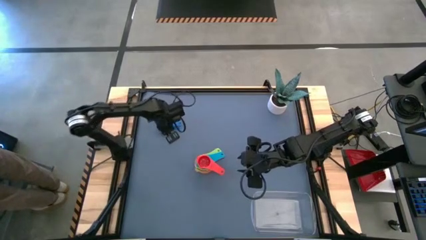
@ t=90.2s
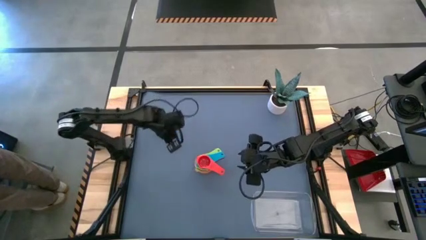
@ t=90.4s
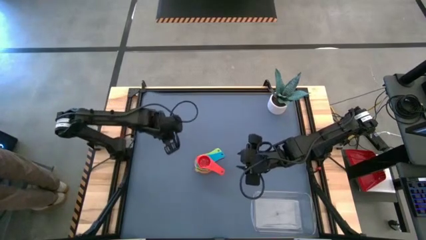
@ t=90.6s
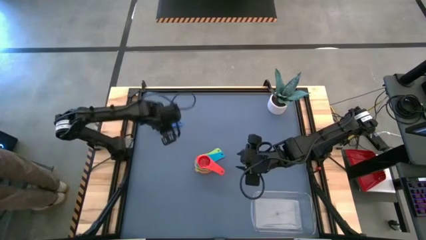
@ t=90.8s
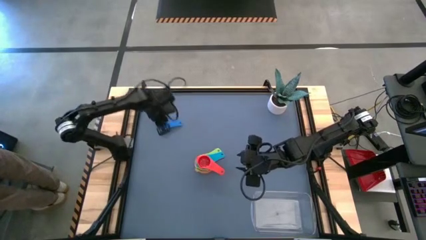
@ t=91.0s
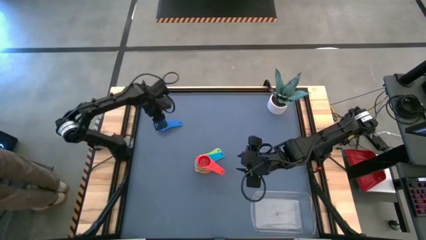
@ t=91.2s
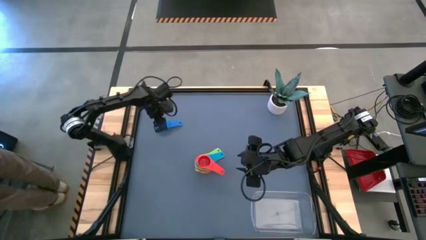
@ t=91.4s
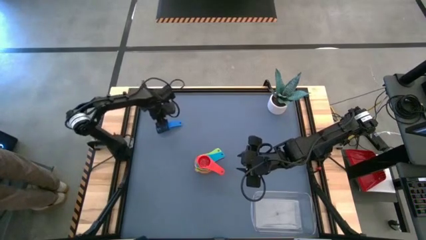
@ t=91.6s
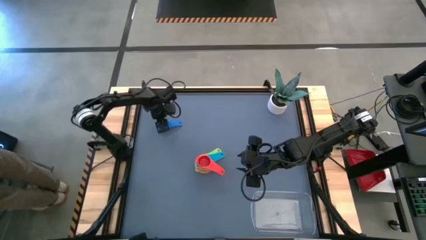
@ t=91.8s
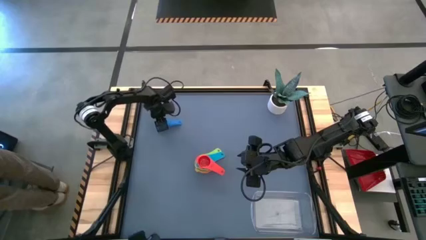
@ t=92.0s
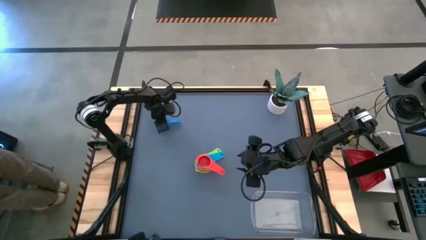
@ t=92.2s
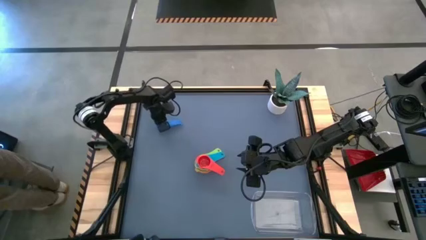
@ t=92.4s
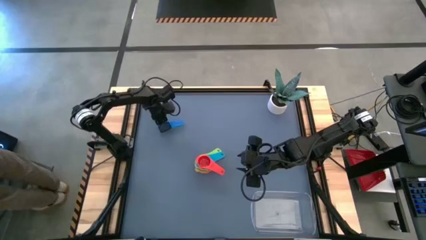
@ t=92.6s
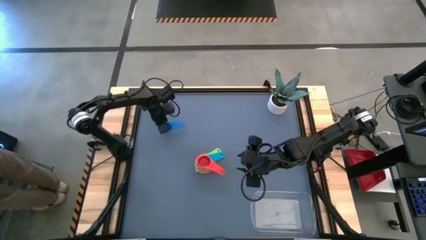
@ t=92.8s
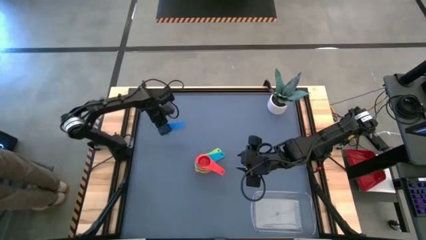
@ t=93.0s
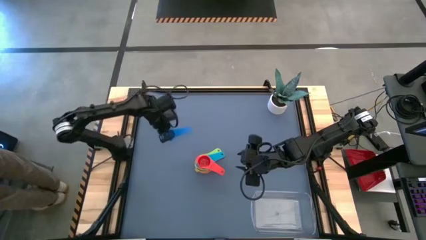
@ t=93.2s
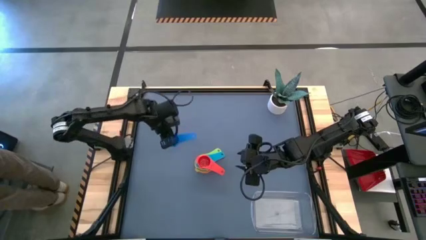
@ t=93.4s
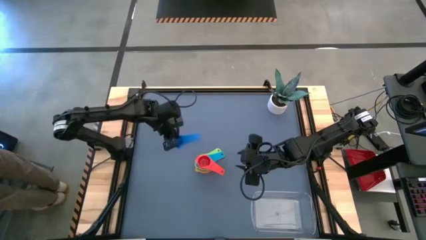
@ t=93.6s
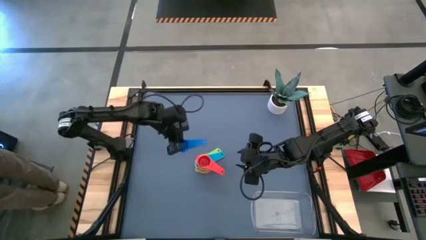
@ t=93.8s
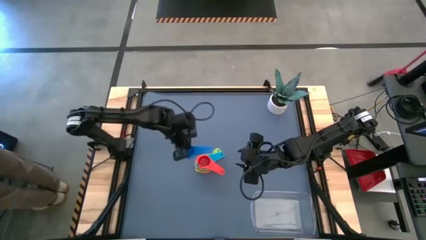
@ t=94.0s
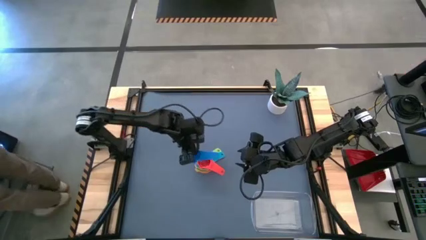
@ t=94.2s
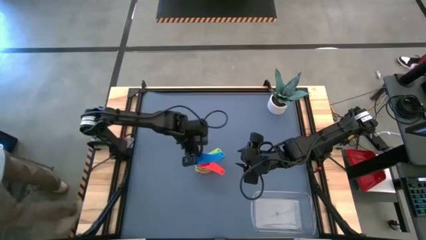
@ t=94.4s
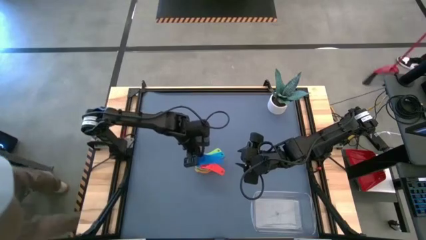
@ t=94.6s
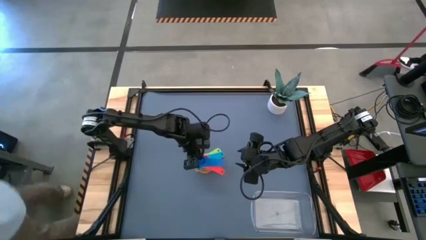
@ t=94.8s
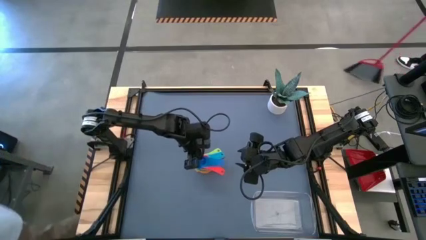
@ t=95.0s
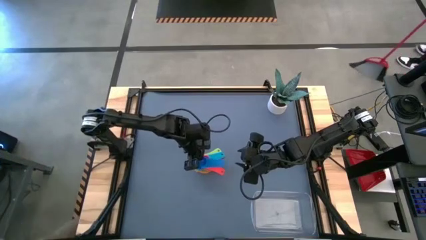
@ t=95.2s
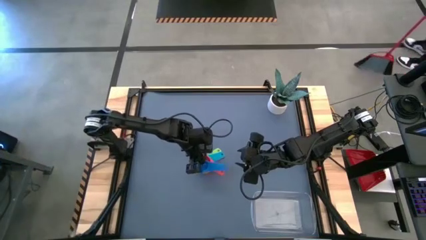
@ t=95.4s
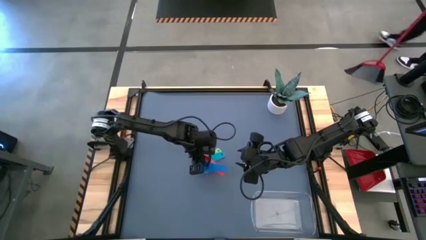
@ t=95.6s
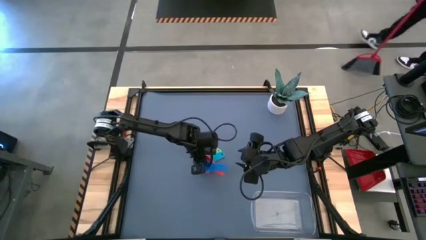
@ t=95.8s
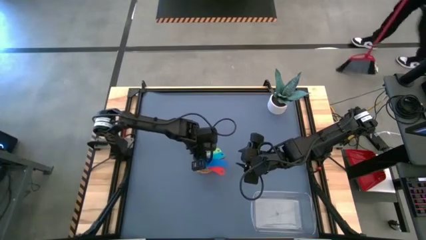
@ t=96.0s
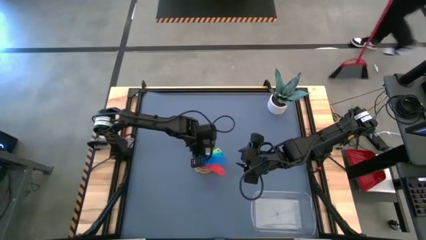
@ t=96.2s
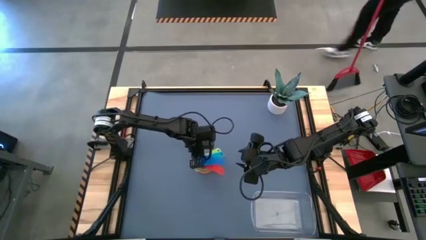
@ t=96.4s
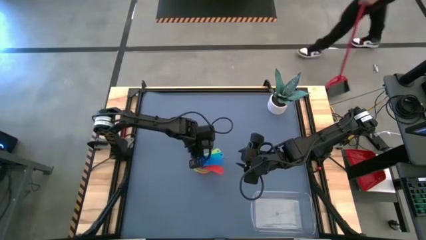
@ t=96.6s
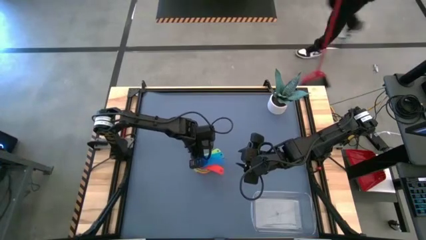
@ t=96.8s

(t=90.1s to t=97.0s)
Task: Nest measuring cups in basket
Stack the blue measuring cup on top of the red measuring cup

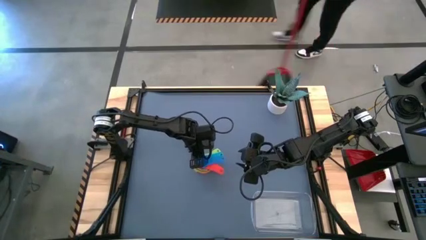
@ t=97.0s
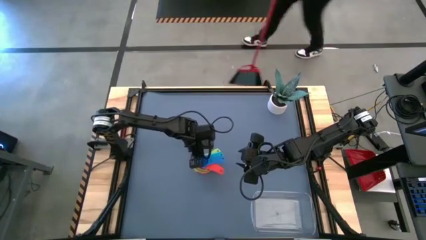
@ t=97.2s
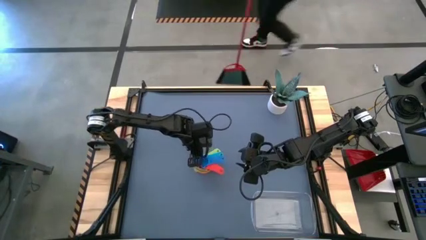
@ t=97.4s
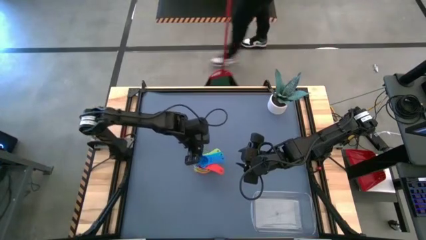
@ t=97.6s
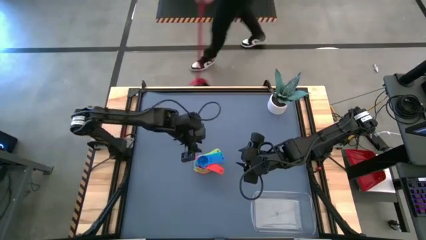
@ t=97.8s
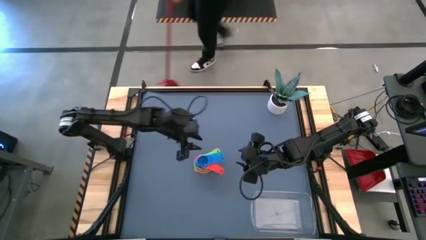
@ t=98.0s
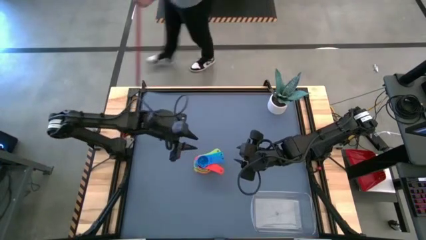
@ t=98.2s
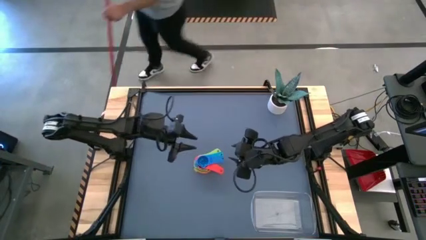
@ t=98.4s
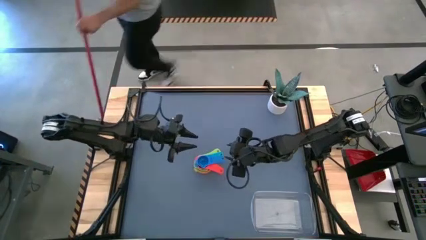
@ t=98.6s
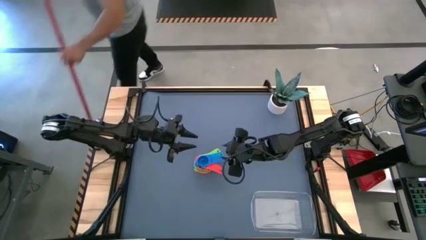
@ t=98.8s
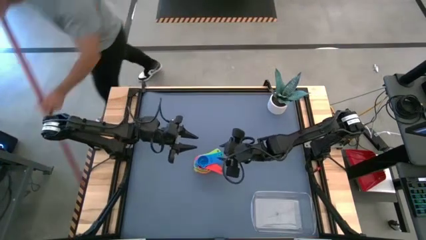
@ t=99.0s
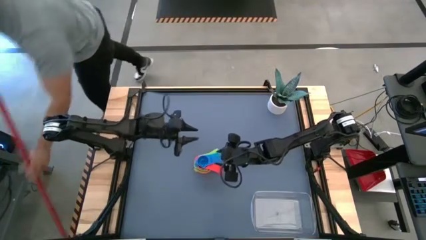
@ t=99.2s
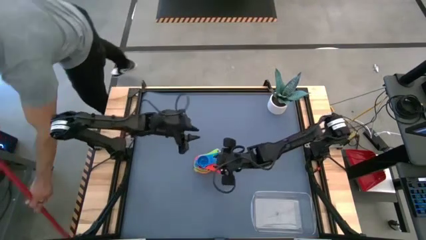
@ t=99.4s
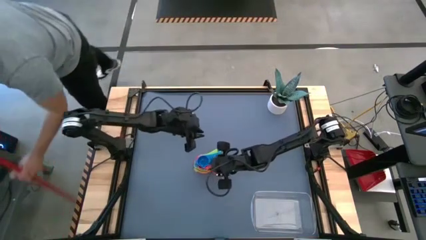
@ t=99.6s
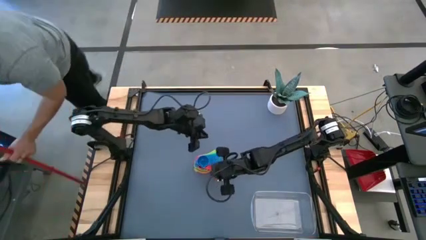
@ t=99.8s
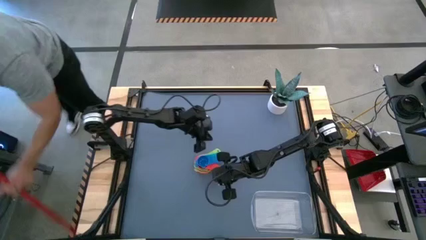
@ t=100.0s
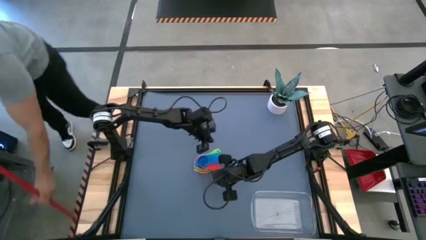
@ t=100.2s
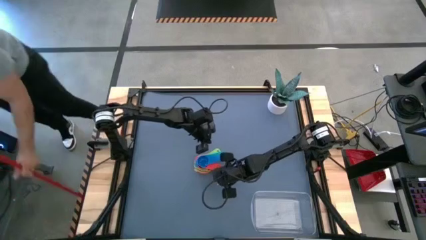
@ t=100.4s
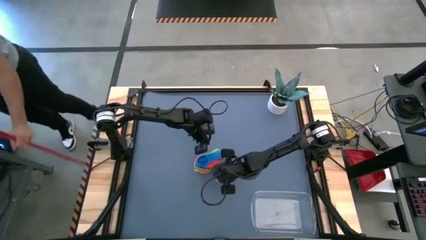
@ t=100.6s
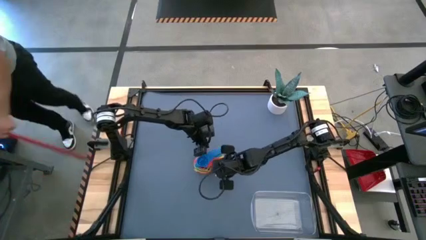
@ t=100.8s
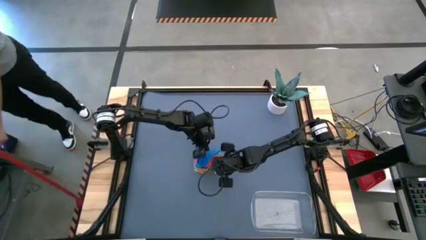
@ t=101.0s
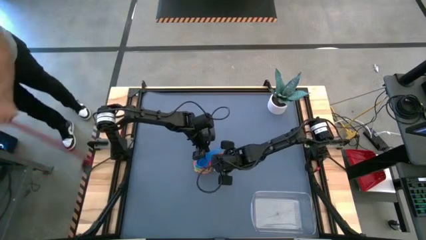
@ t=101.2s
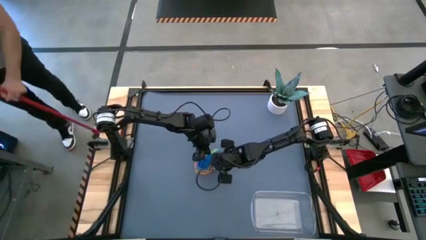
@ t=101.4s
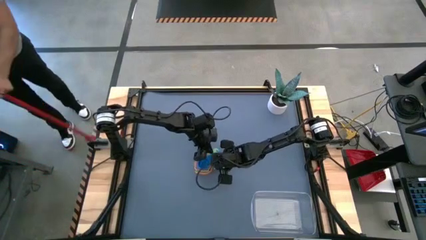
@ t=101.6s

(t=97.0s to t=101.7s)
Adjust the nested measuring cups
